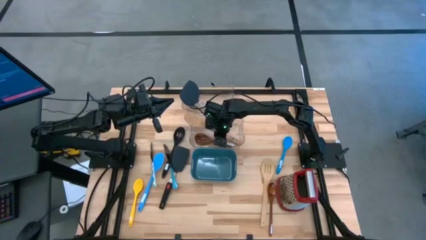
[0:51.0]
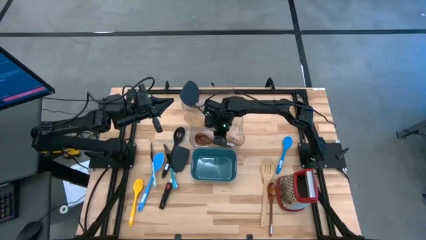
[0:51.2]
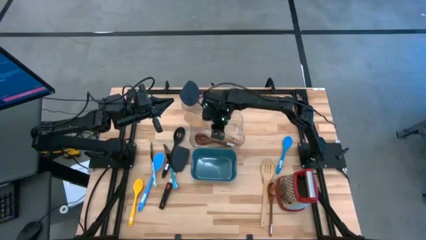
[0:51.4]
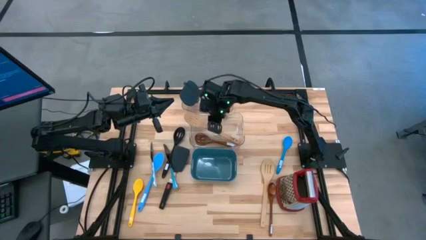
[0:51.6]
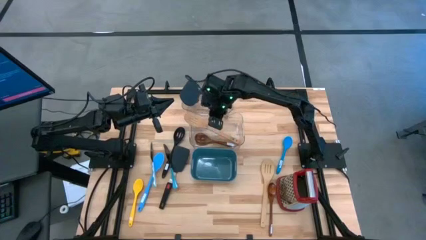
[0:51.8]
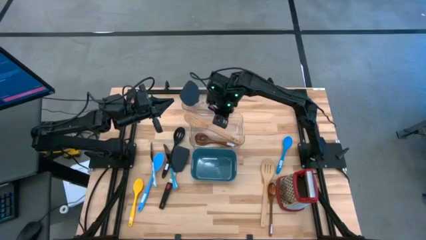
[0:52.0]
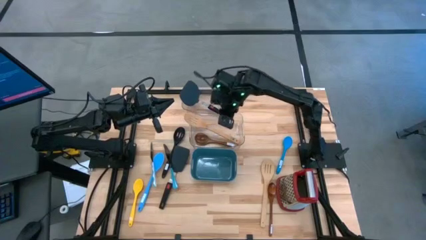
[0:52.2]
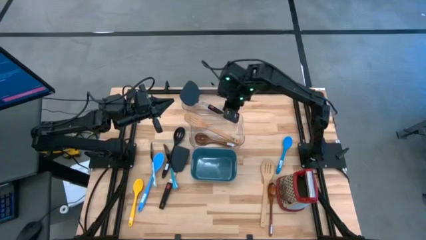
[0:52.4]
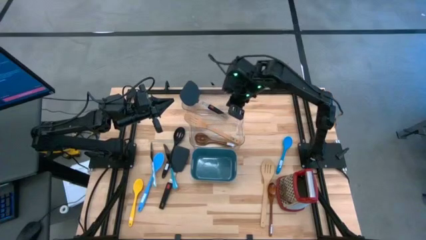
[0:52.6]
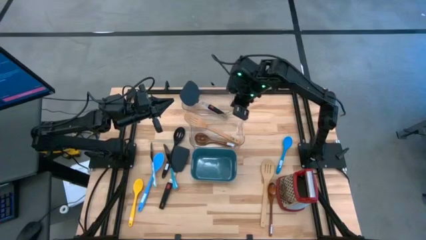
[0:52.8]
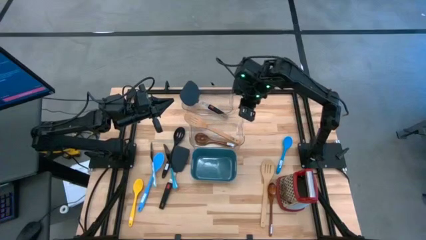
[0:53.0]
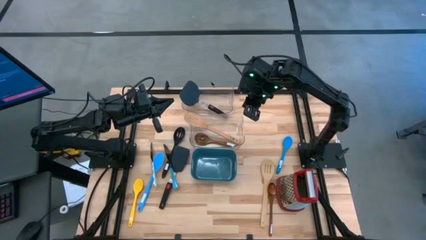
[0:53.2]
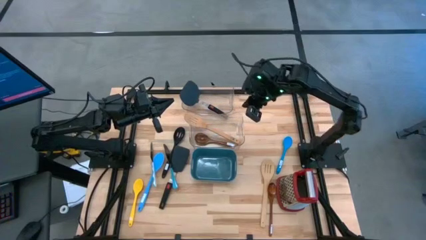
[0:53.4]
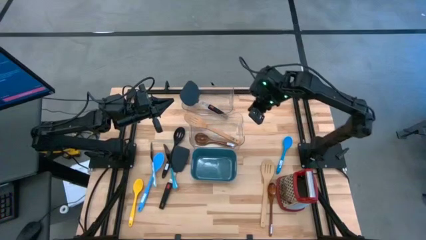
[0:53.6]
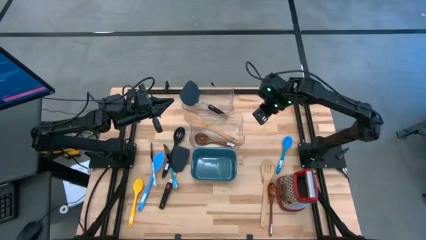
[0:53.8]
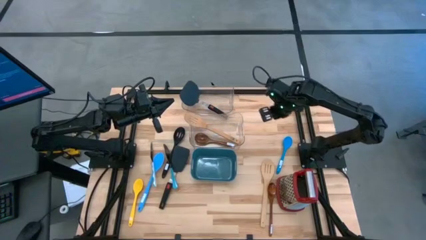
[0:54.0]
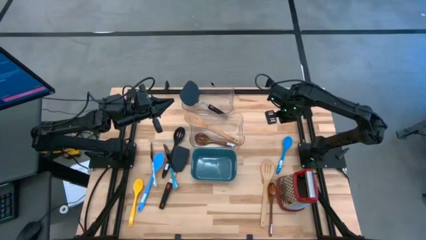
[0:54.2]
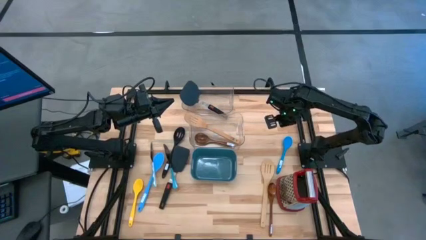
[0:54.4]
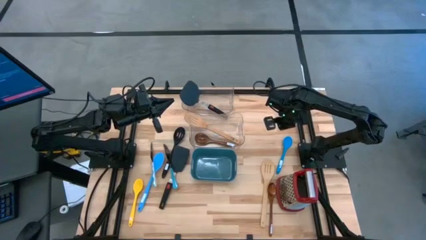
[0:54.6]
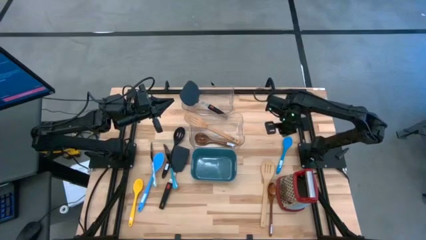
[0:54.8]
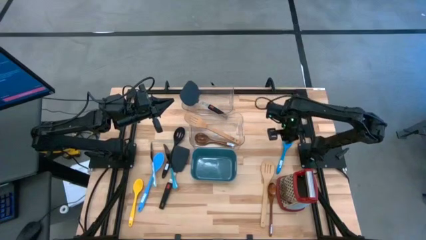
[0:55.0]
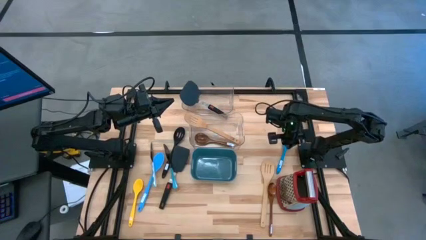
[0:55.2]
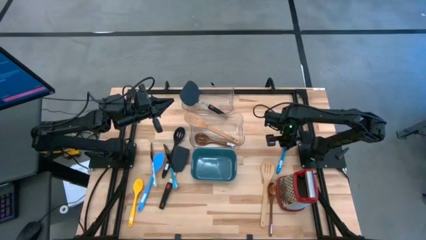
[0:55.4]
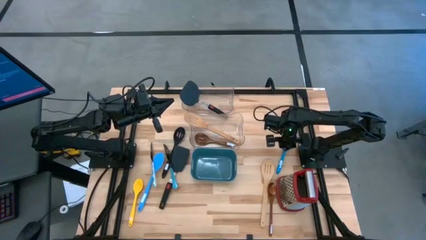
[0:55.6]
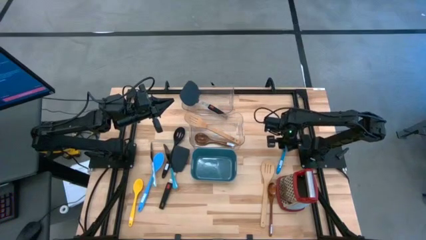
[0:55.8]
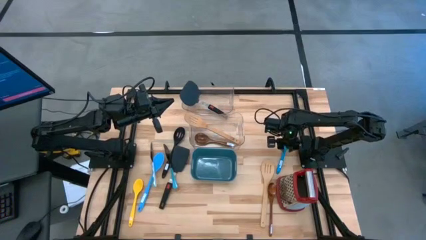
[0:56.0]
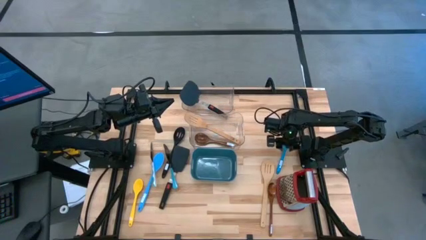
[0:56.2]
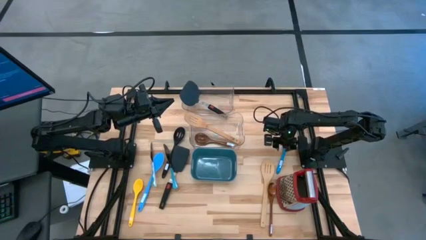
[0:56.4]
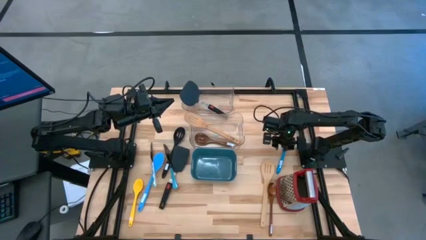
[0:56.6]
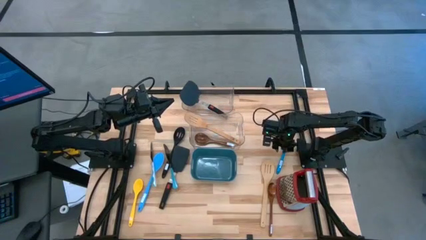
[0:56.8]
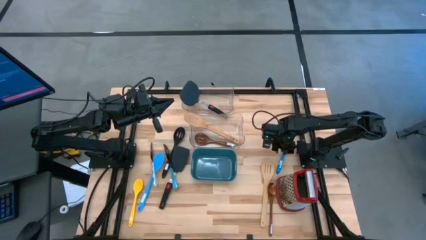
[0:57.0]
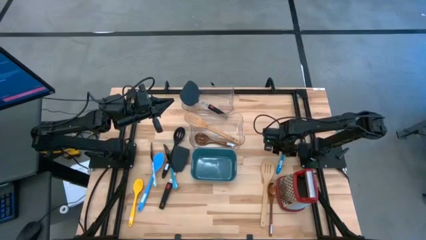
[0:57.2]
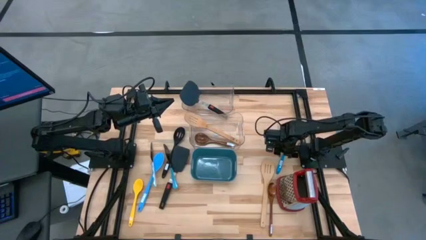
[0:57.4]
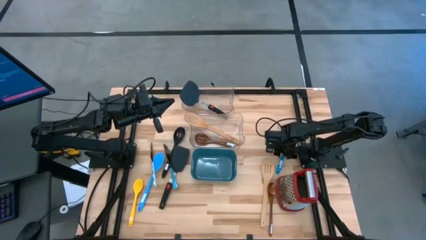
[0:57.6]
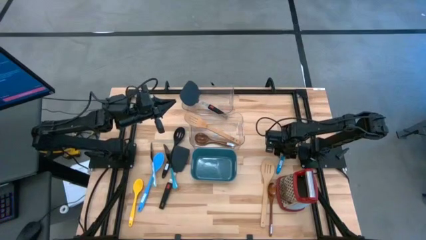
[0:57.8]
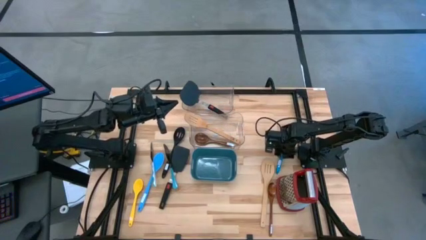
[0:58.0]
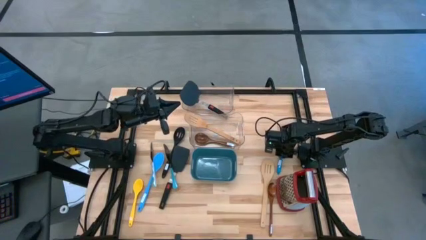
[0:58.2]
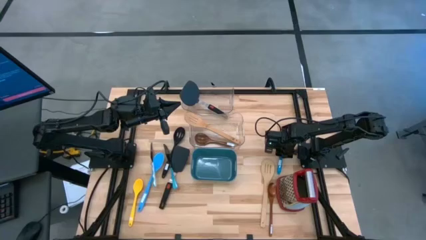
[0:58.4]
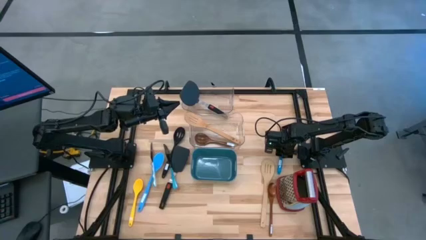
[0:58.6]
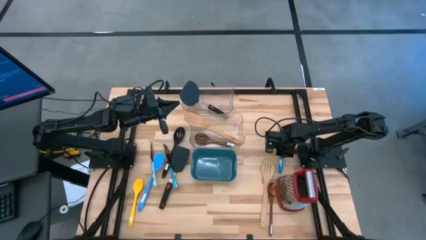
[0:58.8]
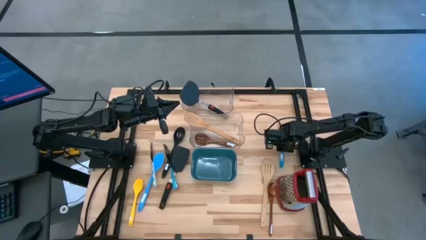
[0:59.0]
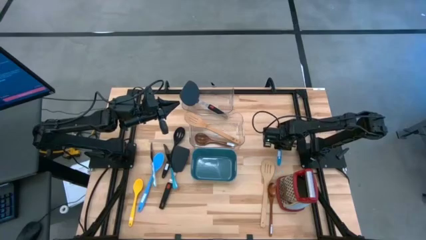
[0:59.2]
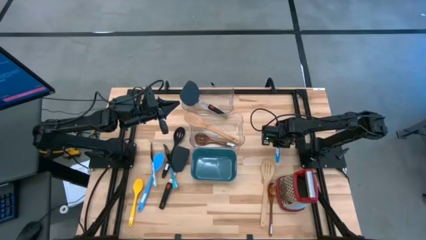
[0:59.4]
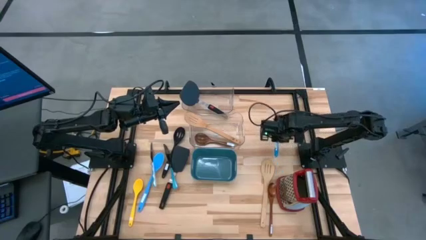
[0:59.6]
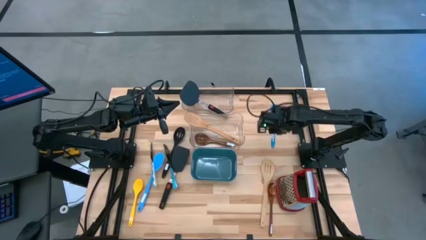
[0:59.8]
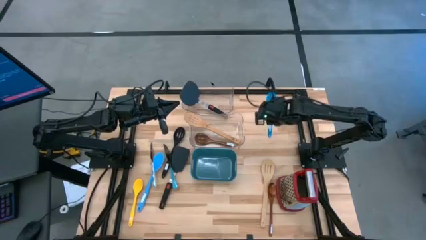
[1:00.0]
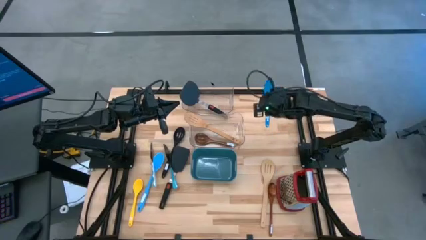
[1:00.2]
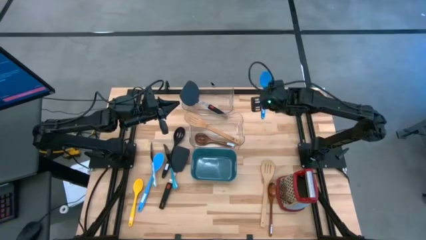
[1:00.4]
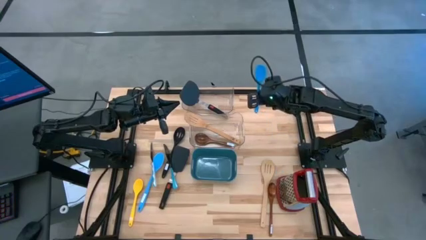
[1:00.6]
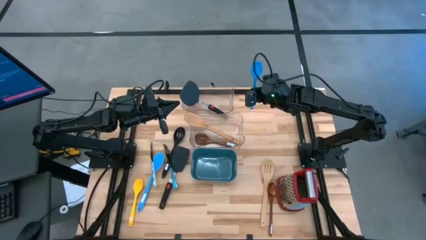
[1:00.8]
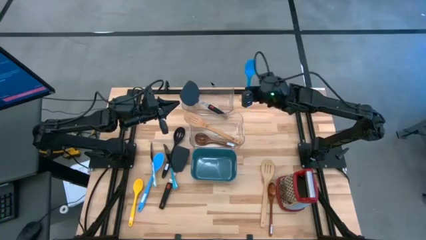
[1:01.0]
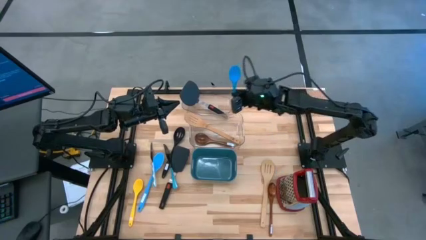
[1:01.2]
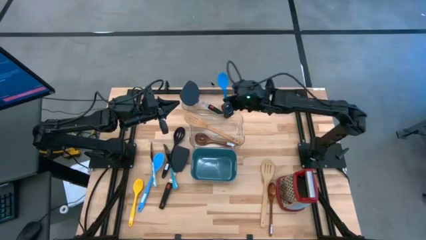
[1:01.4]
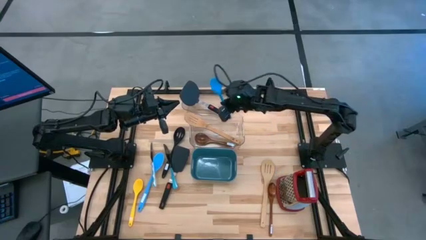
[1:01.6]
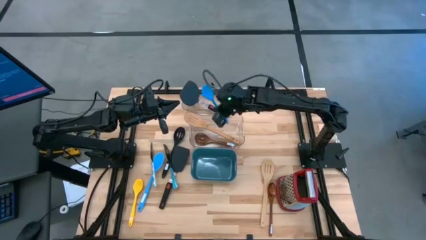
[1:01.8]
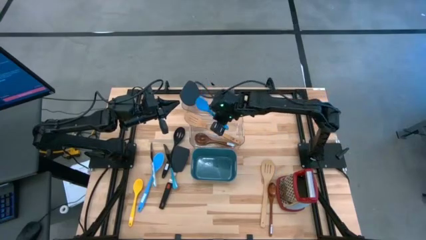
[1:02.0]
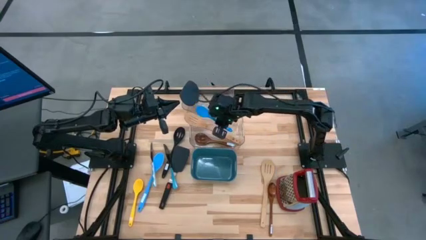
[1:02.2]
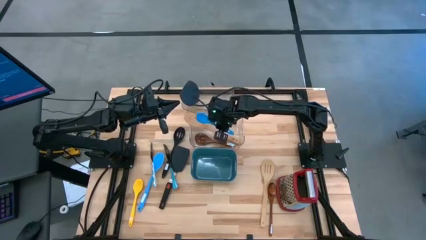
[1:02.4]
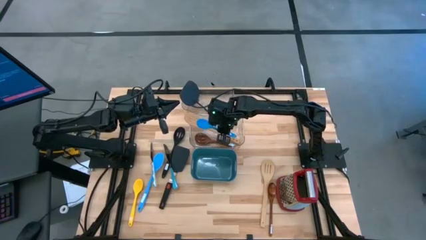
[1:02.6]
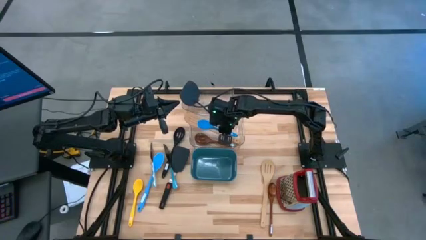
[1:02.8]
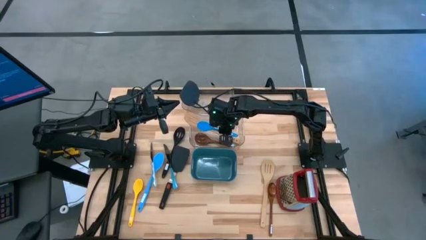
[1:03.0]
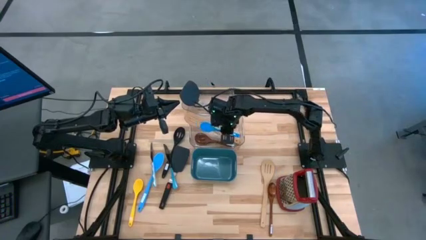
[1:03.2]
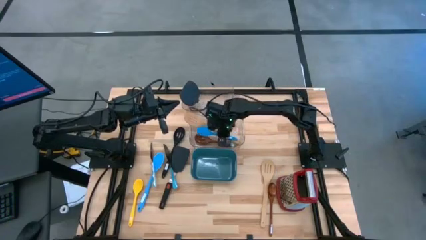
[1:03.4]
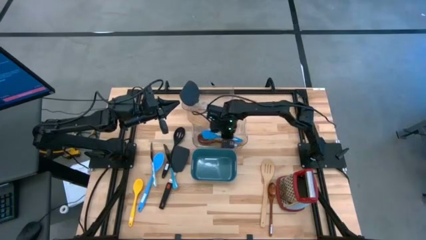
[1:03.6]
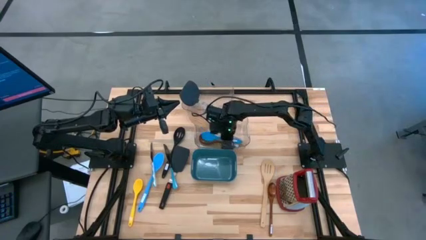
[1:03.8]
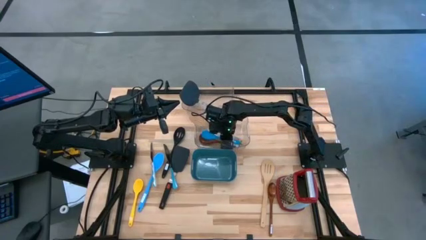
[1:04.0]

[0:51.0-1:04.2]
Task: Pick & Place Kitchen Items
Put the right blue serving spoon into the bottom transparent bin
